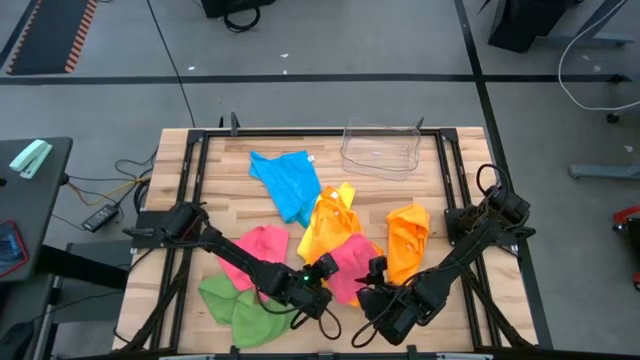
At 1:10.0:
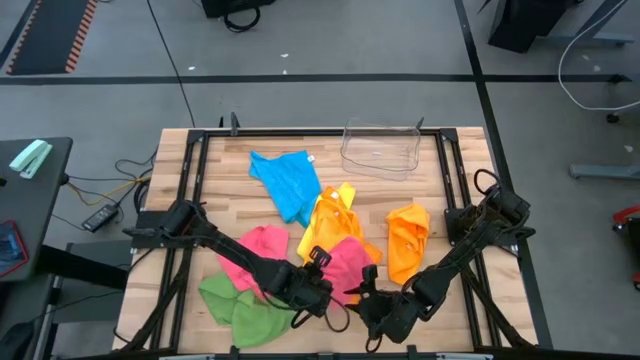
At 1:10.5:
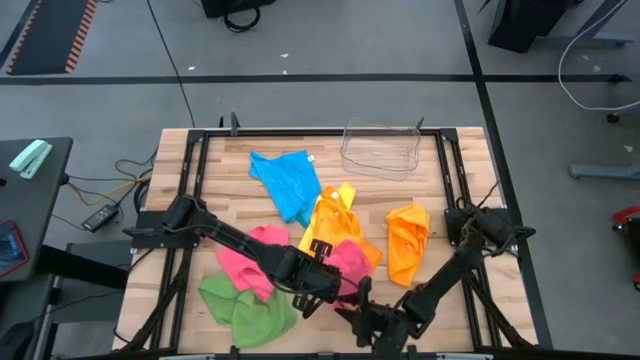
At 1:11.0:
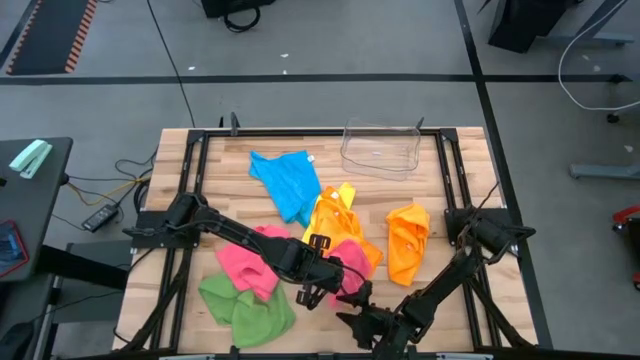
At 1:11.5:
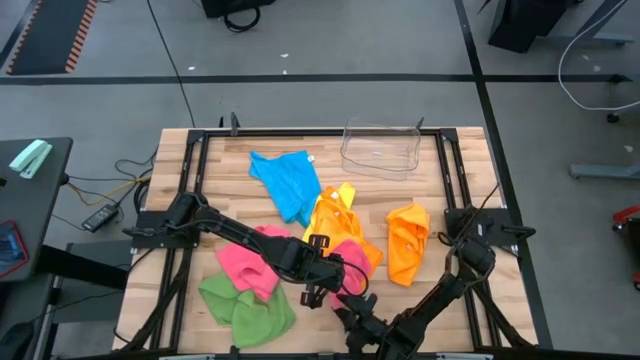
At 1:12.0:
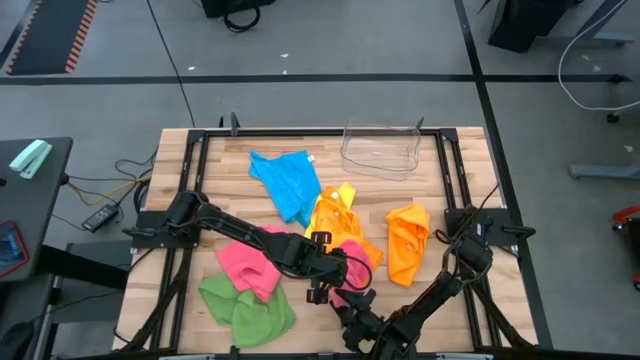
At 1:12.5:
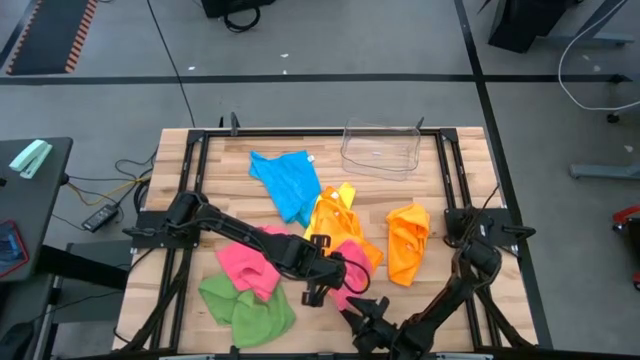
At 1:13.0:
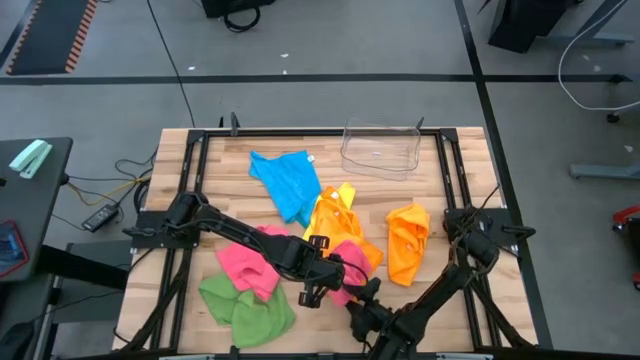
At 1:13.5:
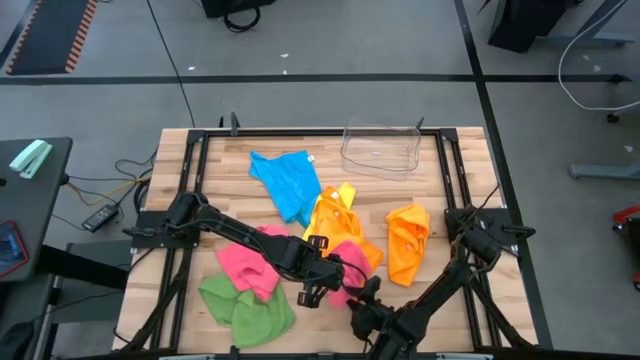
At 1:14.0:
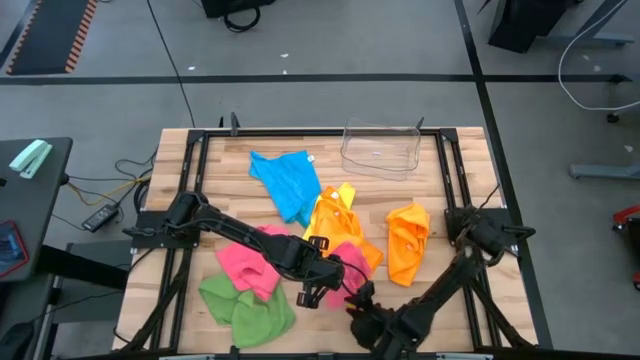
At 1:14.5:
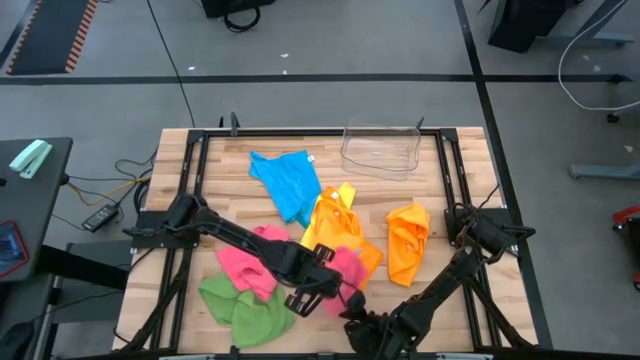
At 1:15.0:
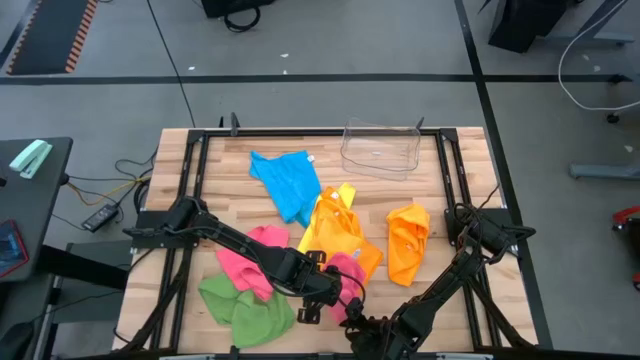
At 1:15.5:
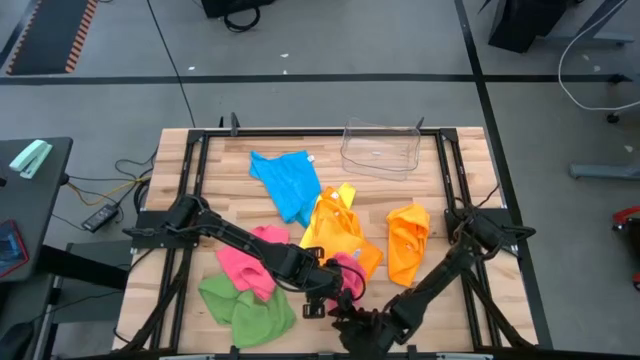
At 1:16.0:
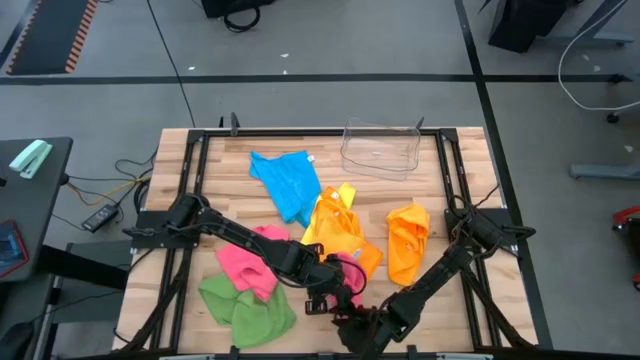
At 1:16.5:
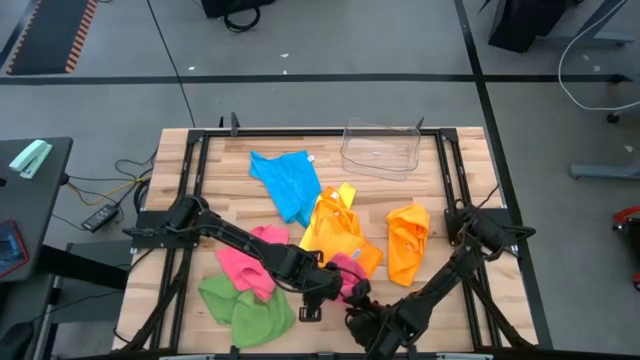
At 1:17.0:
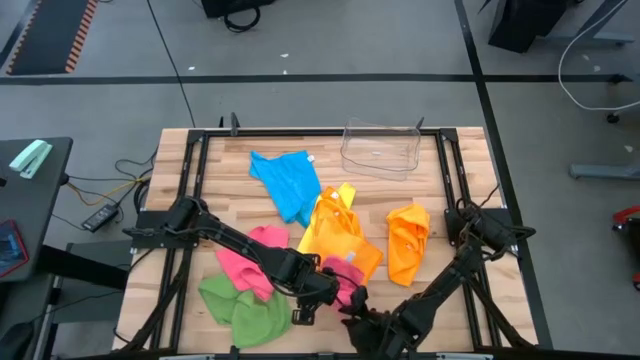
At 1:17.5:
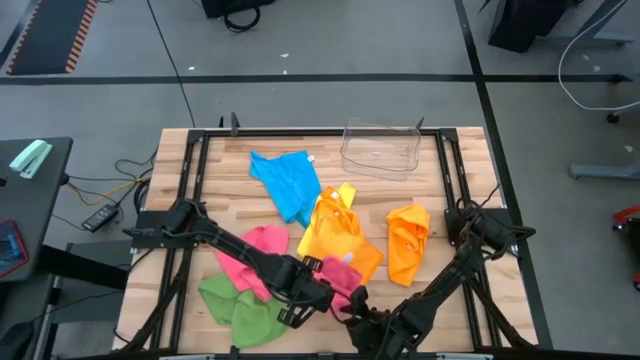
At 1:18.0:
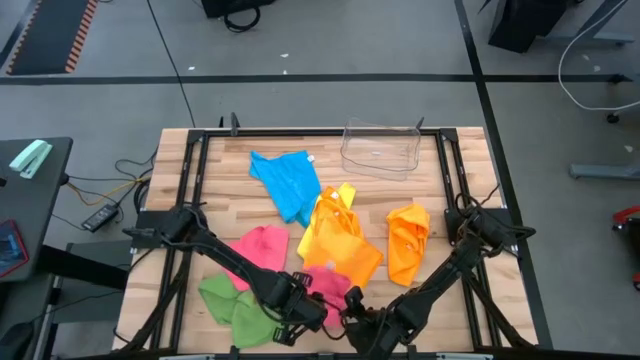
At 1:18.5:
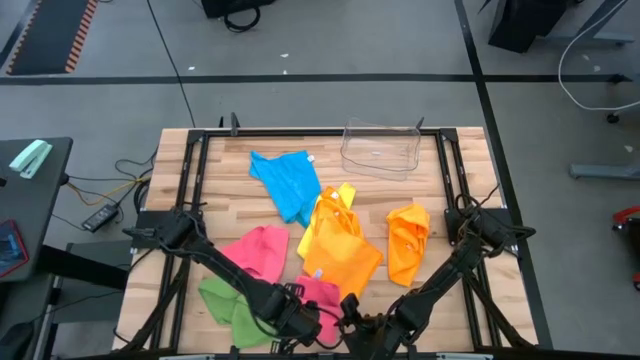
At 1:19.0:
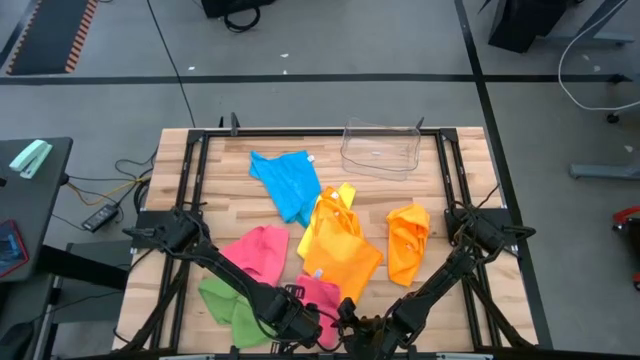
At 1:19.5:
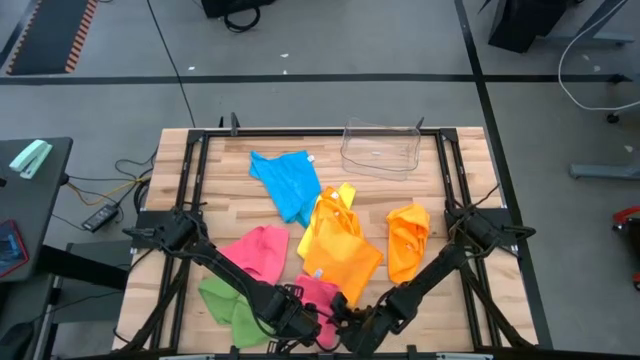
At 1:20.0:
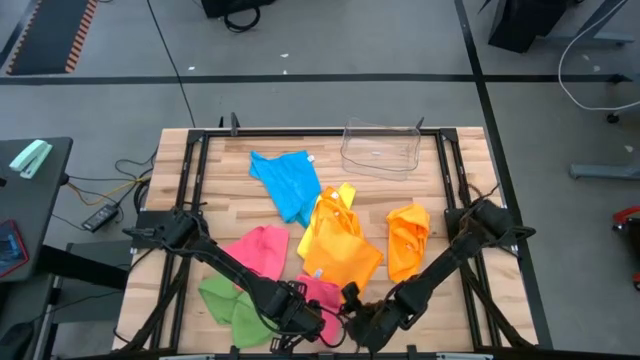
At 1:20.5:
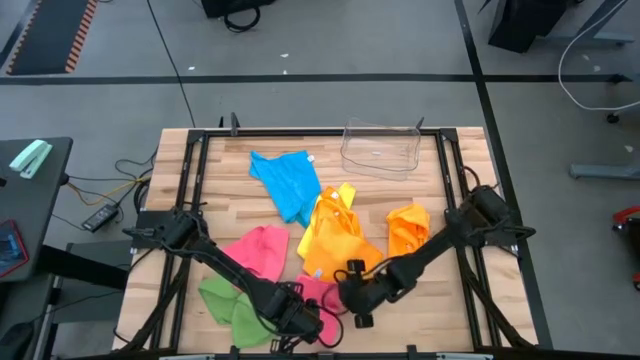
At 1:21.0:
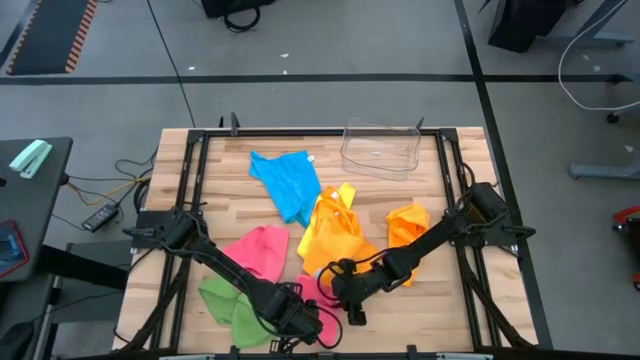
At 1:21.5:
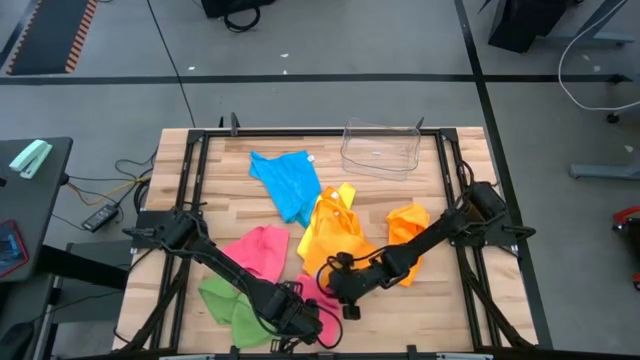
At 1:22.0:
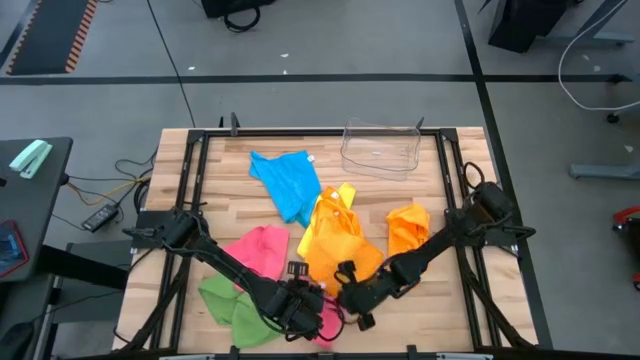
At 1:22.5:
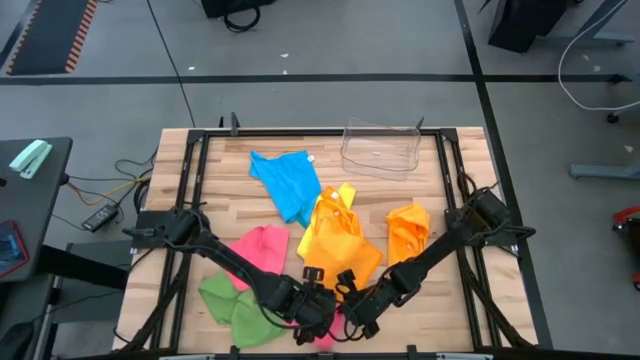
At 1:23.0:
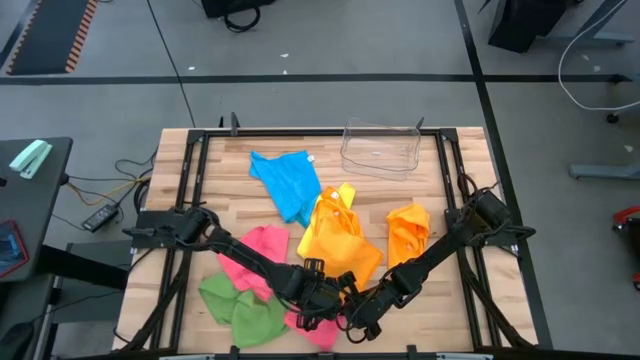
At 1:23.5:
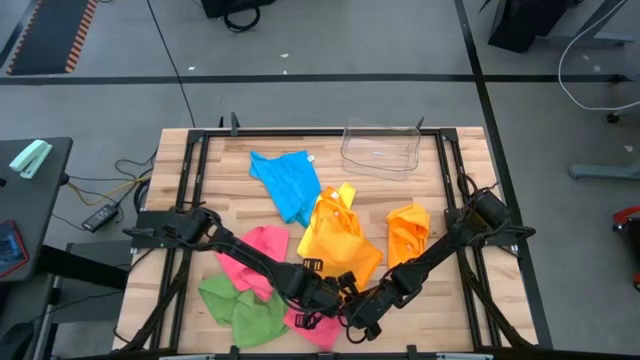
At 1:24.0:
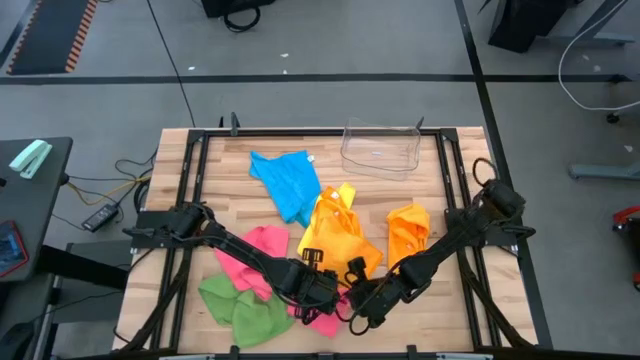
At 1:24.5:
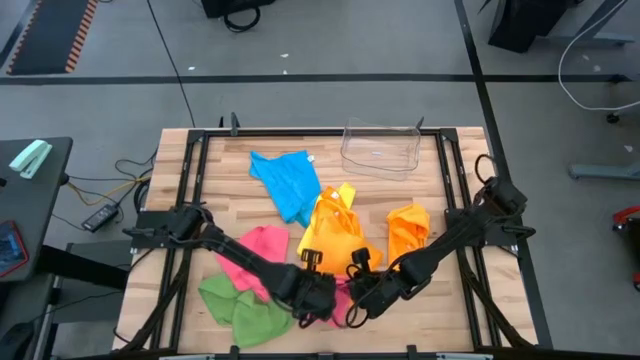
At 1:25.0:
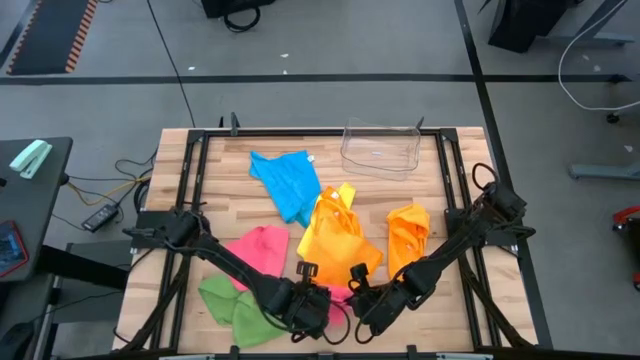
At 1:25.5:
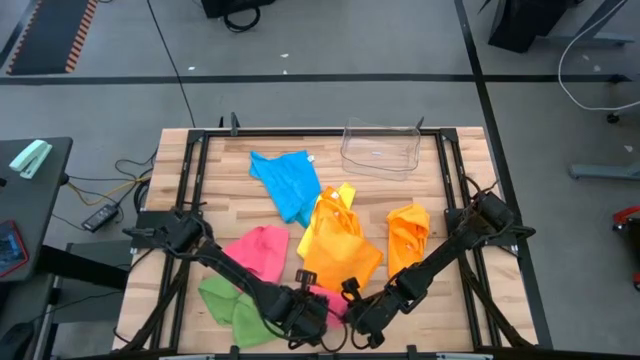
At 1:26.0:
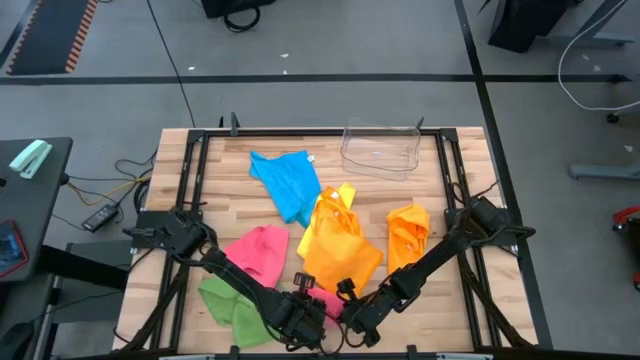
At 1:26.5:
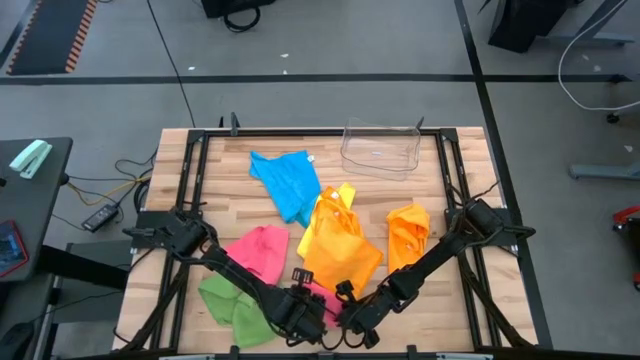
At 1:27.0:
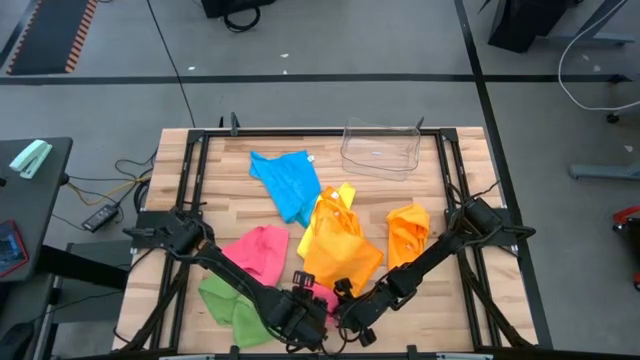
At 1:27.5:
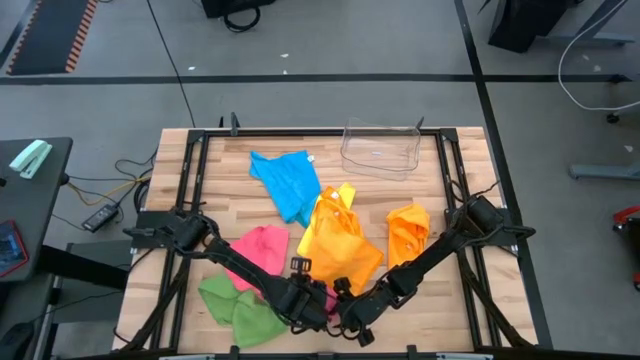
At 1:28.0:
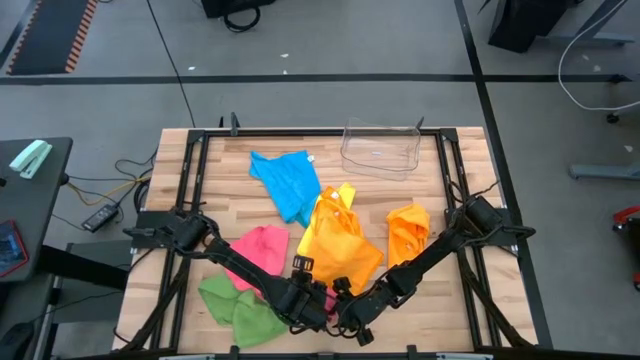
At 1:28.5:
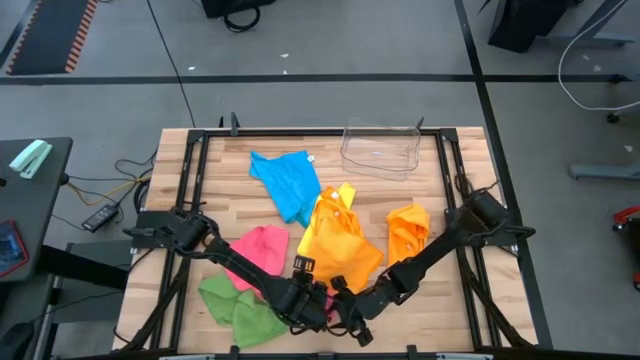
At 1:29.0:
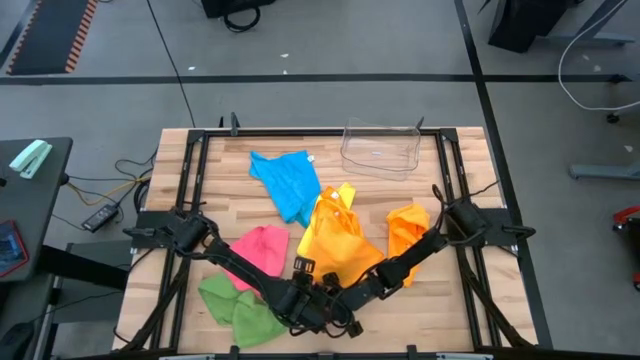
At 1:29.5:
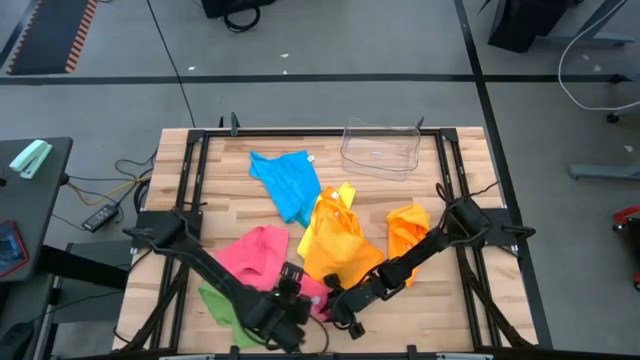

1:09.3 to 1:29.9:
Task: Fold microfiber towels
Fold the top pink microfiber cloth
